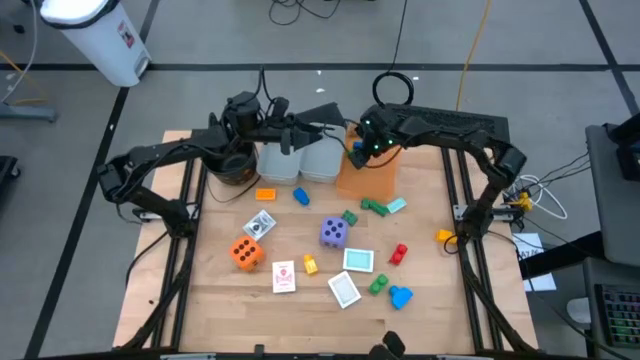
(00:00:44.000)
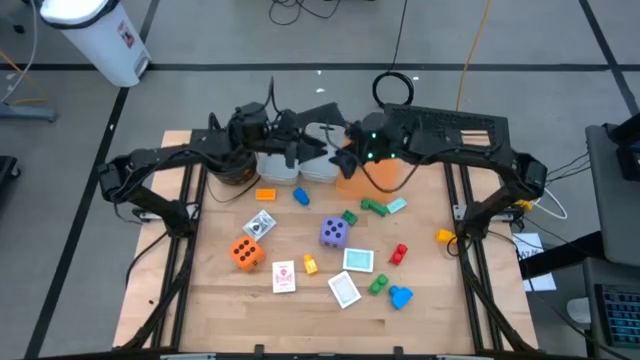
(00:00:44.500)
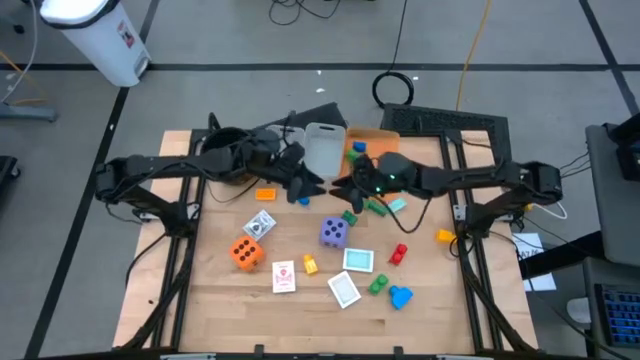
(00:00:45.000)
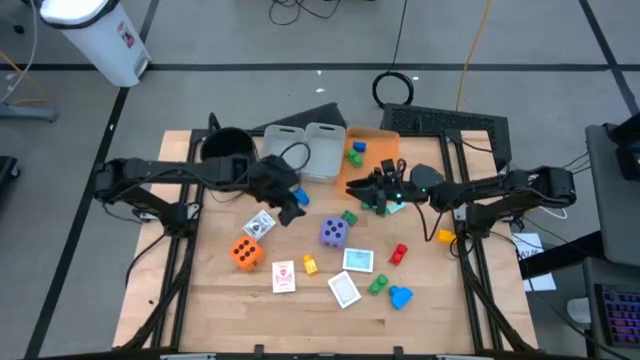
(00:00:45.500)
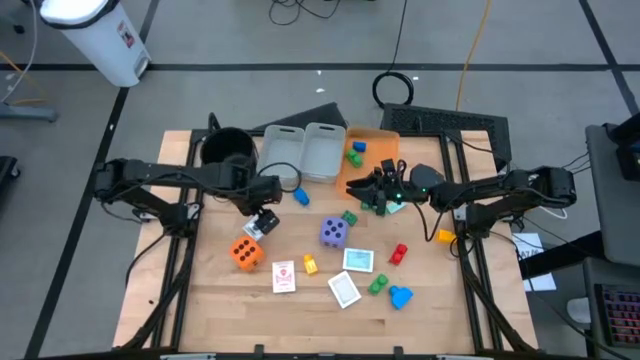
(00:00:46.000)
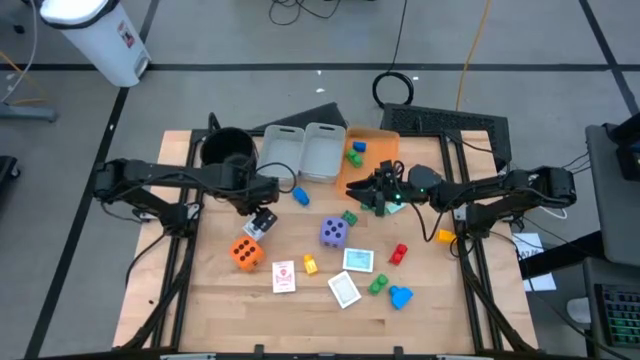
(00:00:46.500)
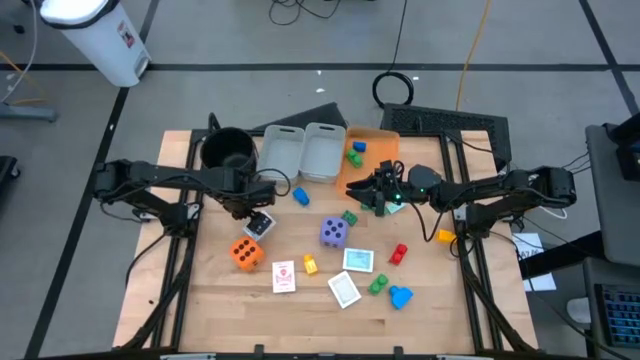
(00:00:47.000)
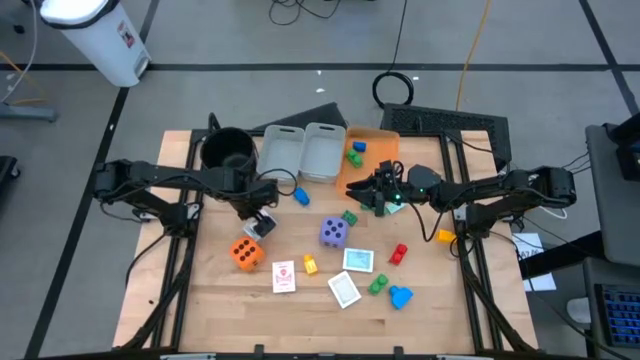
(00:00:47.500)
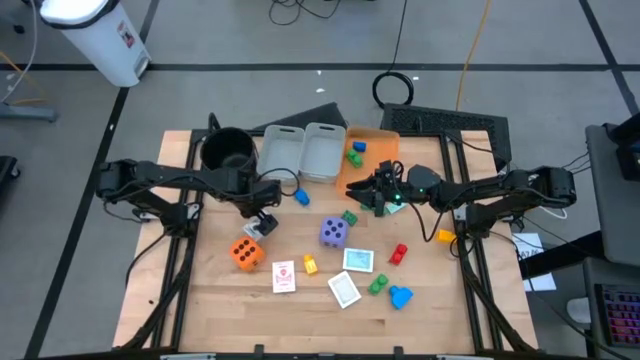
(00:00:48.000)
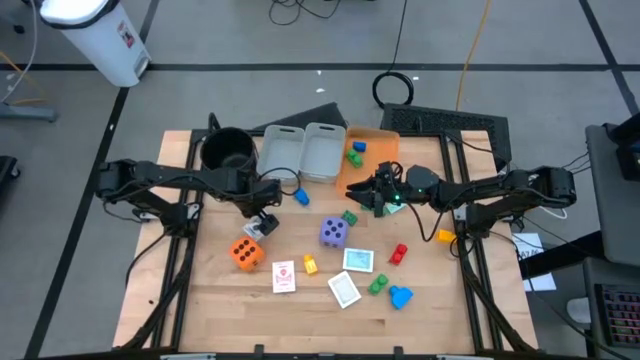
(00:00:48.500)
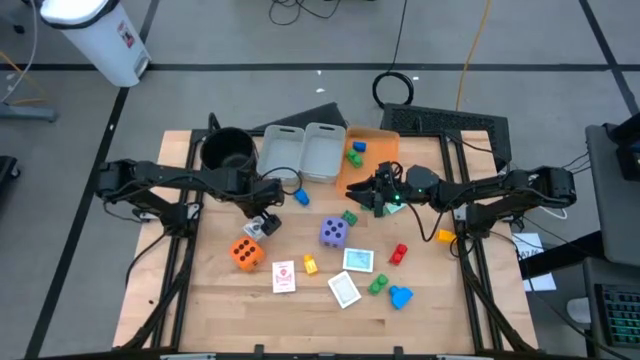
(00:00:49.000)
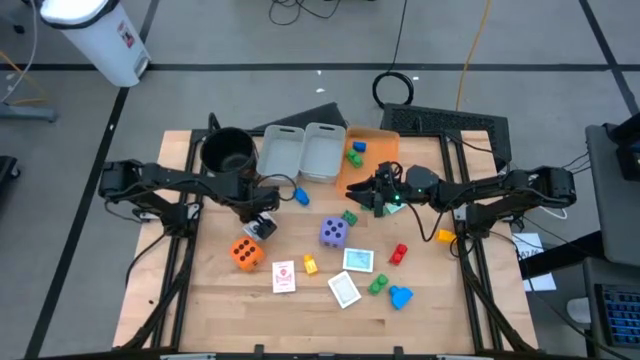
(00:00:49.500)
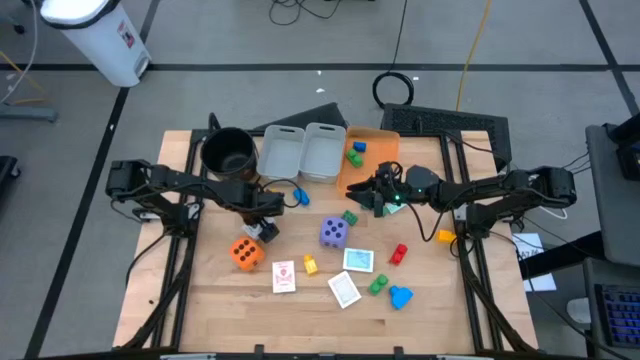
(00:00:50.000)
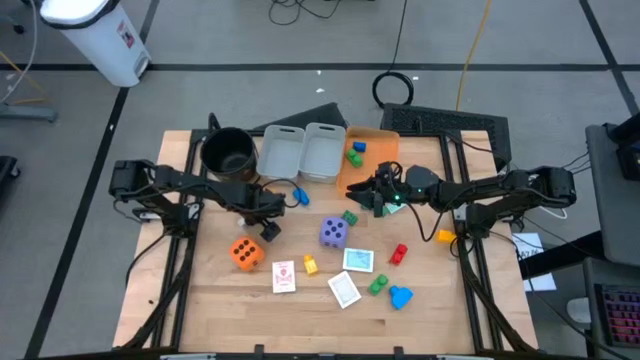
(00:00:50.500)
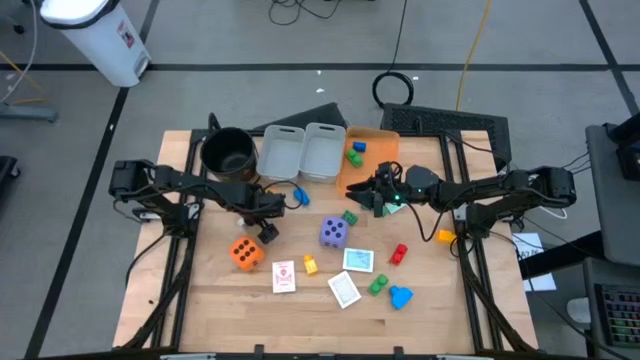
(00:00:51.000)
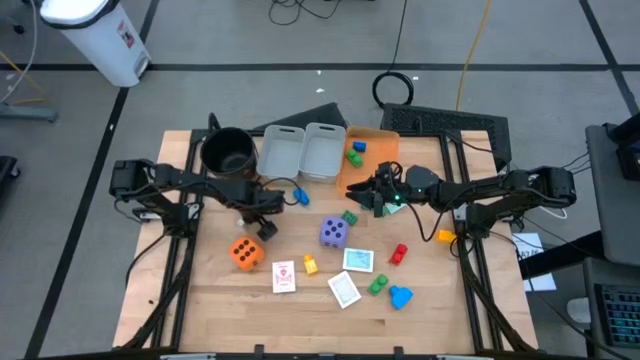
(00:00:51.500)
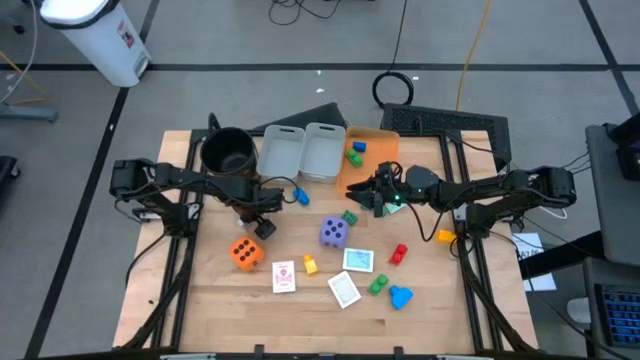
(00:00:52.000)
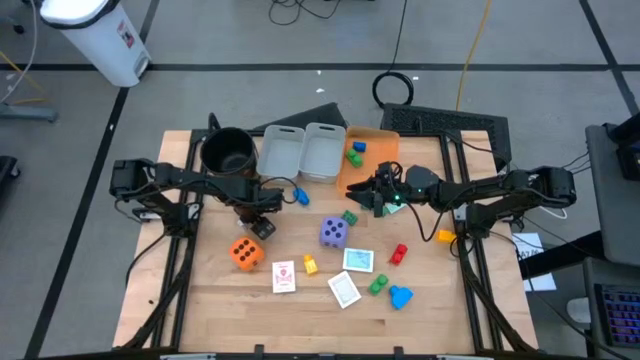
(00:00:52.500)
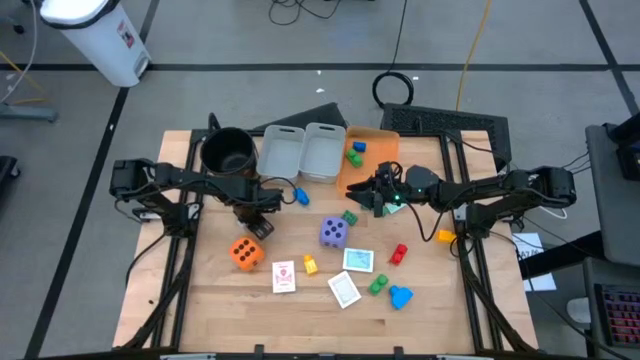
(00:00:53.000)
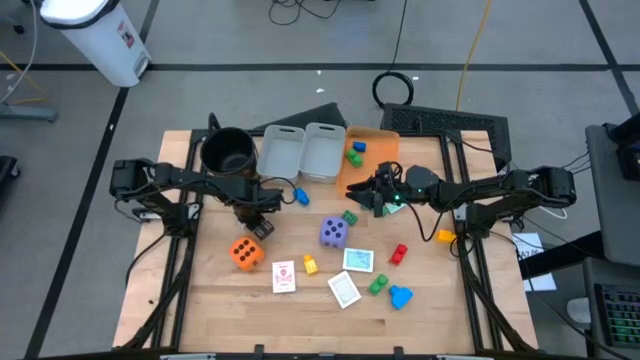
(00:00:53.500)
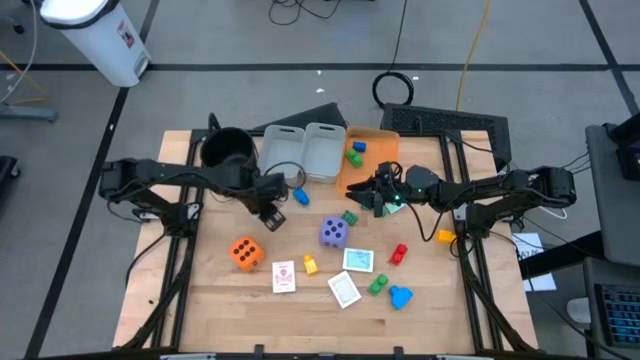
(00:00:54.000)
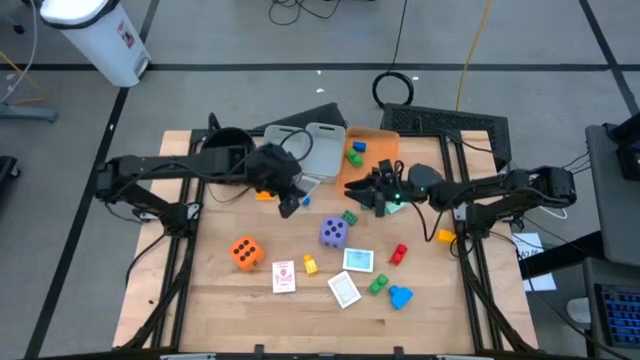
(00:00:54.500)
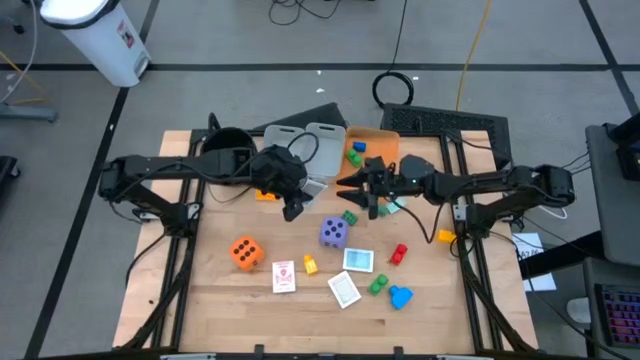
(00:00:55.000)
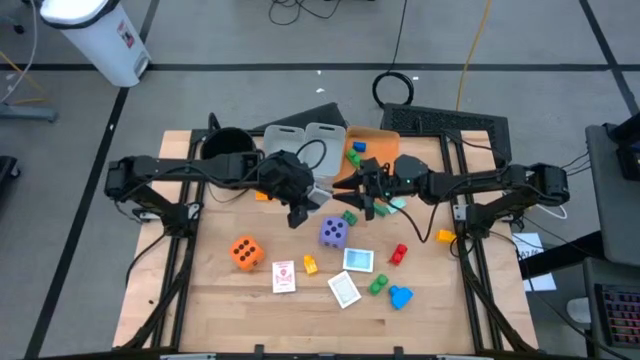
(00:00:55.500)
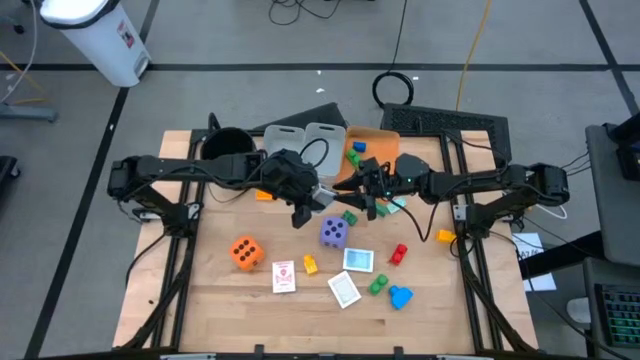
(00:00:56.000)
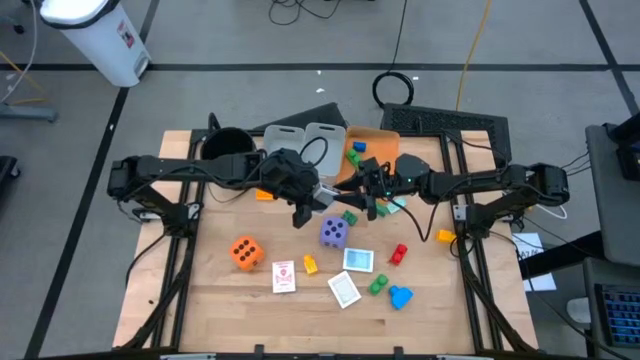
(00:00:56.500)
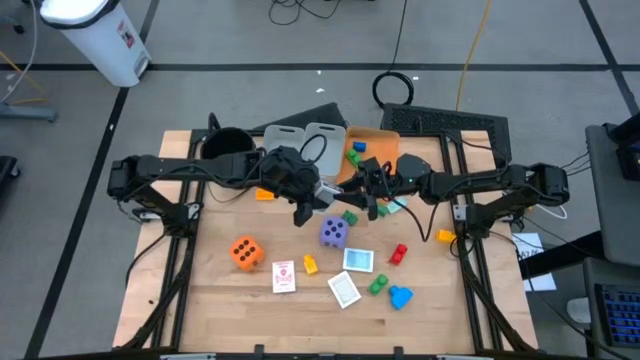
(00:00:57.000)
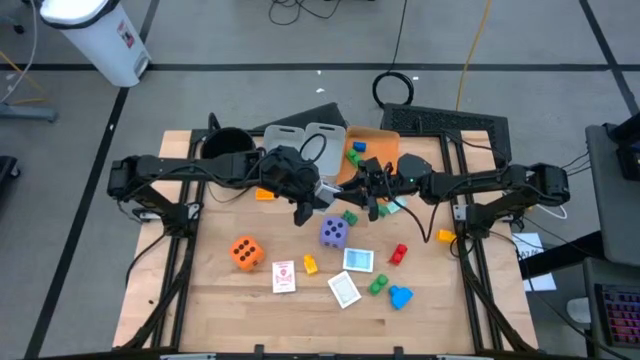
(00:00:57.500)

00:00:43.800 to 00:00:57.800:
Task: Pick & Place Toys
Put the black deck of cards into the left gray bin
